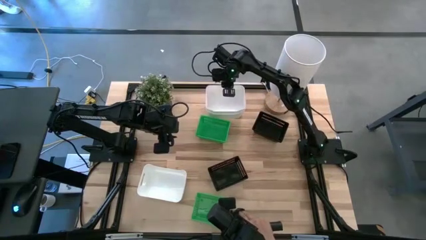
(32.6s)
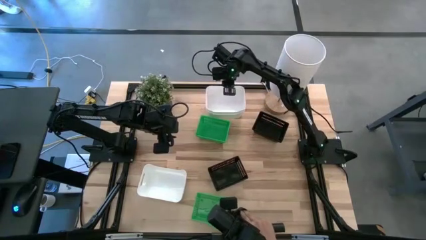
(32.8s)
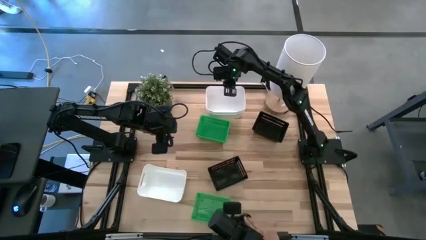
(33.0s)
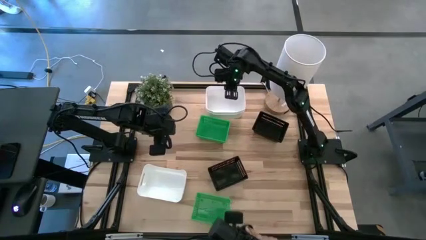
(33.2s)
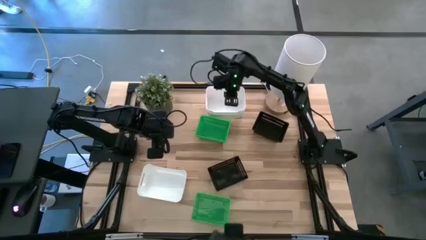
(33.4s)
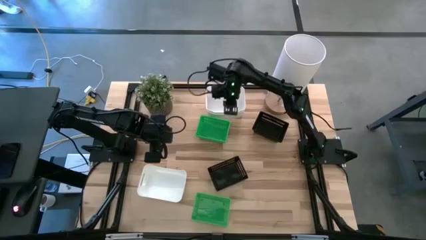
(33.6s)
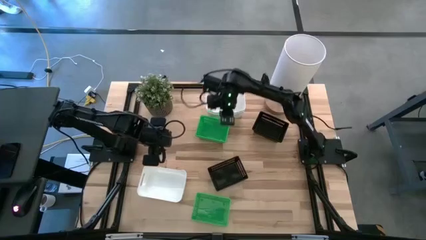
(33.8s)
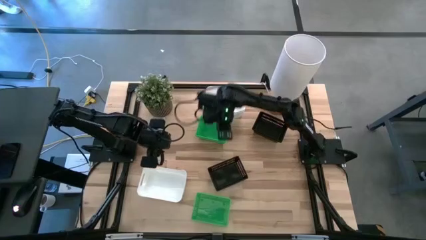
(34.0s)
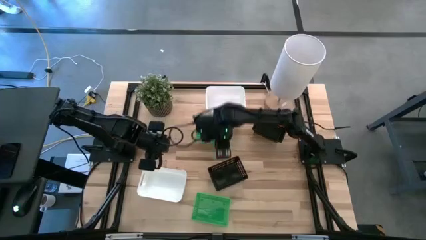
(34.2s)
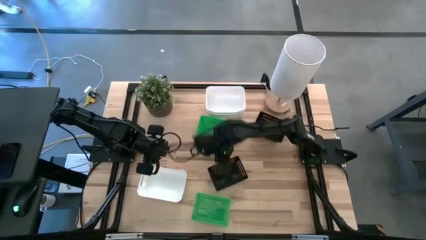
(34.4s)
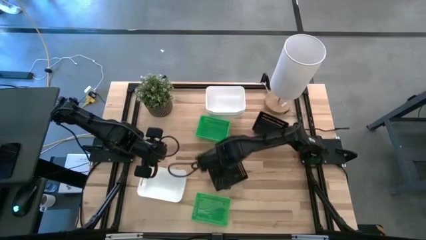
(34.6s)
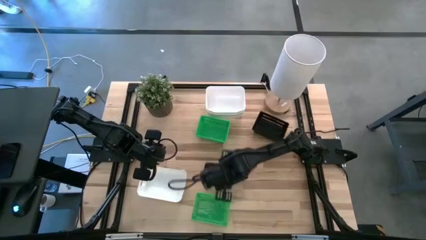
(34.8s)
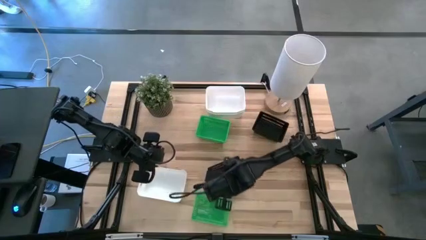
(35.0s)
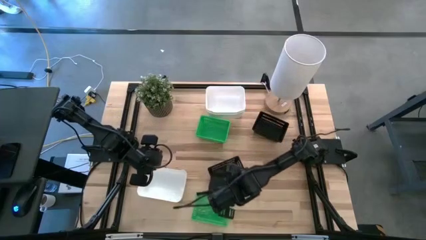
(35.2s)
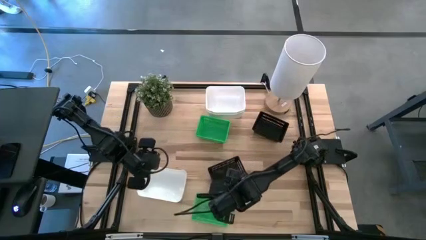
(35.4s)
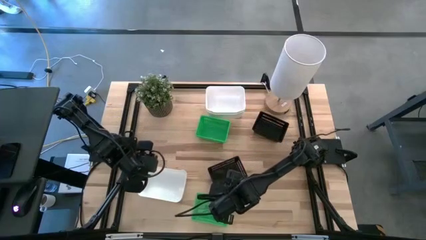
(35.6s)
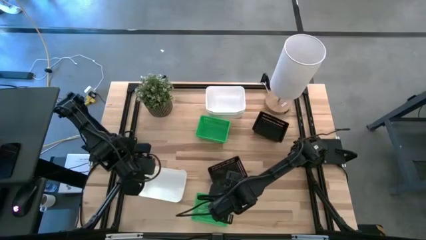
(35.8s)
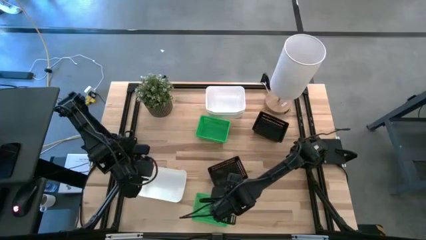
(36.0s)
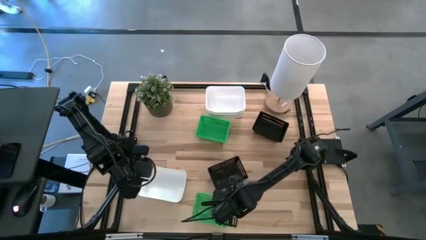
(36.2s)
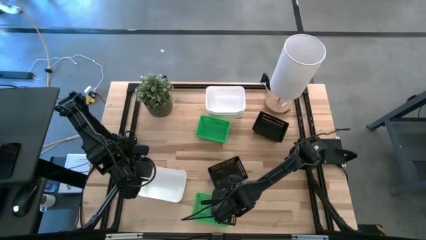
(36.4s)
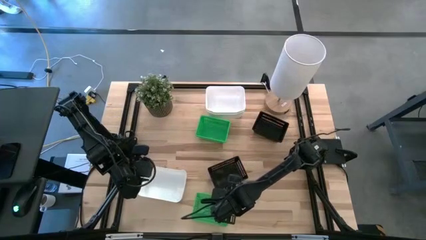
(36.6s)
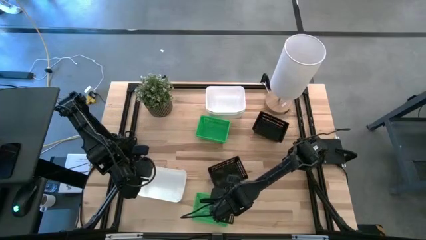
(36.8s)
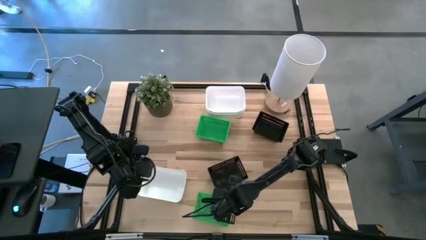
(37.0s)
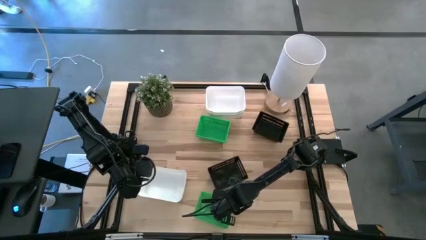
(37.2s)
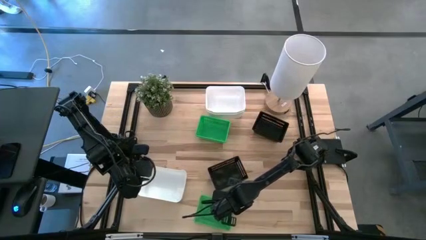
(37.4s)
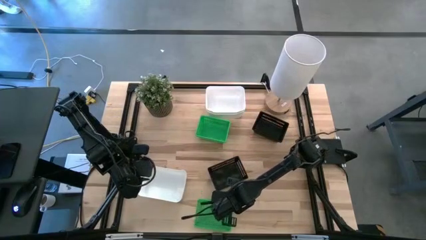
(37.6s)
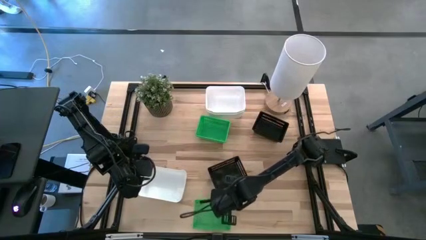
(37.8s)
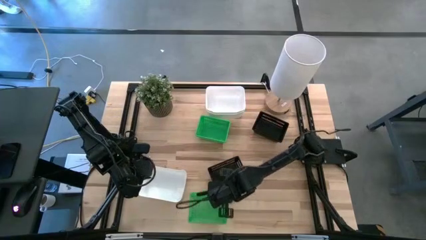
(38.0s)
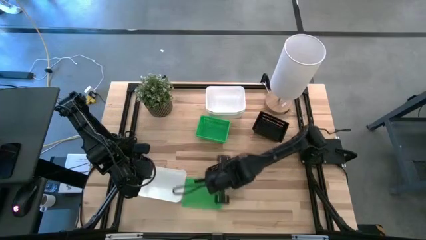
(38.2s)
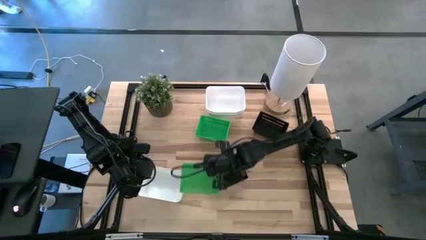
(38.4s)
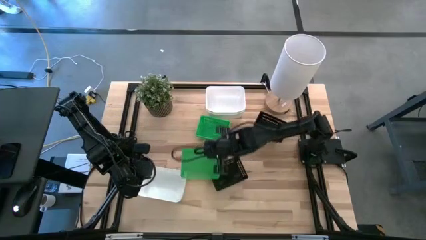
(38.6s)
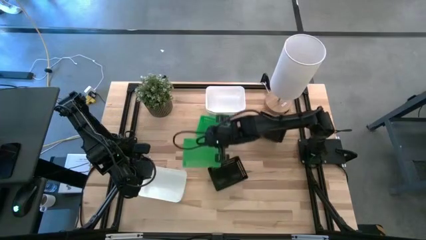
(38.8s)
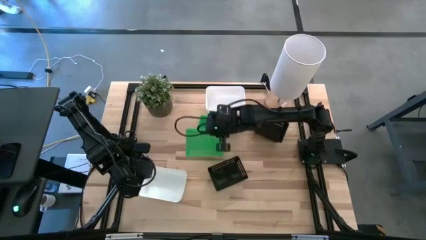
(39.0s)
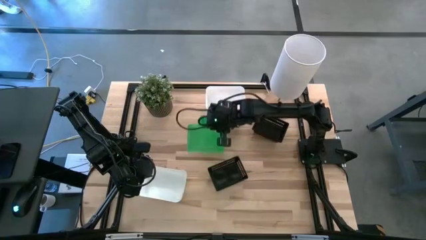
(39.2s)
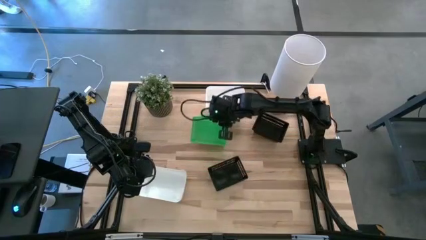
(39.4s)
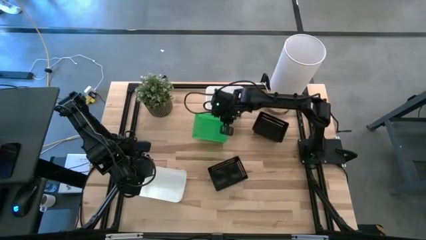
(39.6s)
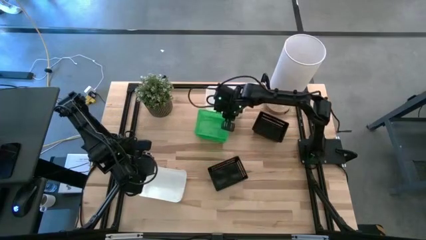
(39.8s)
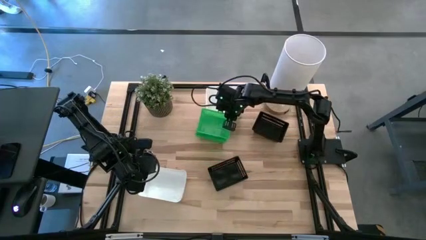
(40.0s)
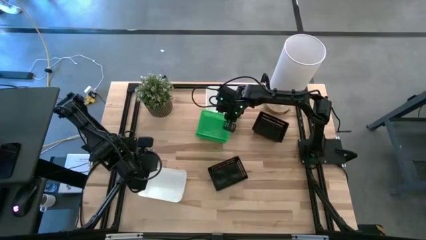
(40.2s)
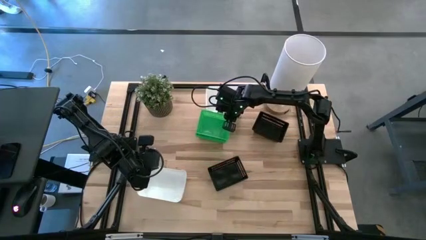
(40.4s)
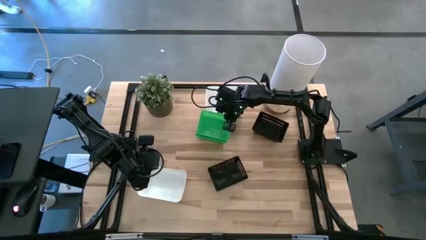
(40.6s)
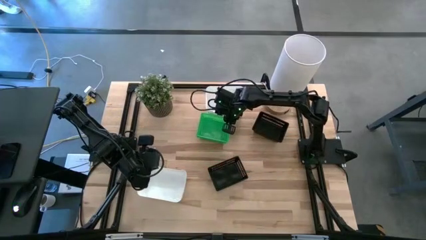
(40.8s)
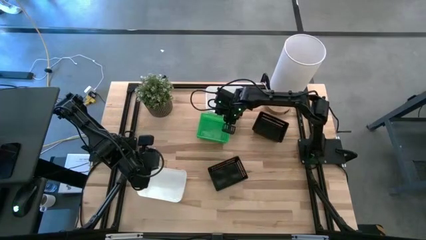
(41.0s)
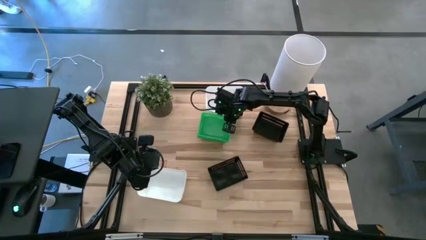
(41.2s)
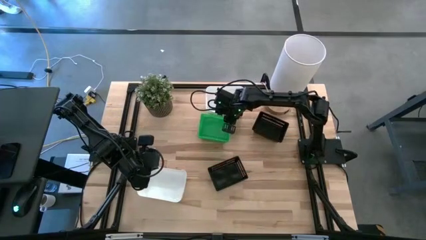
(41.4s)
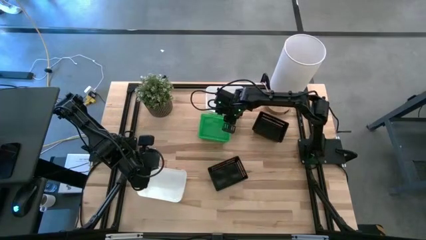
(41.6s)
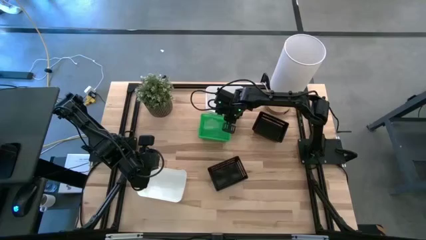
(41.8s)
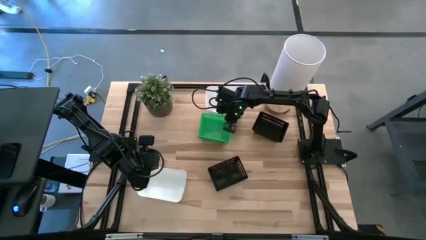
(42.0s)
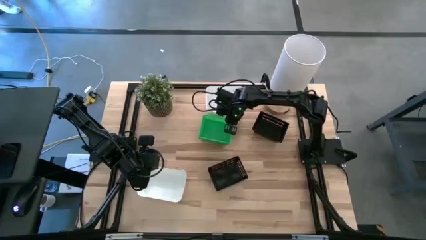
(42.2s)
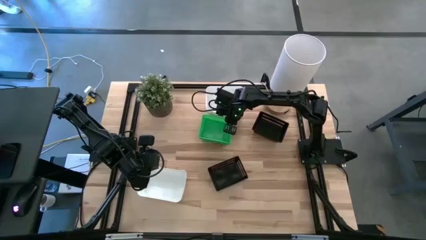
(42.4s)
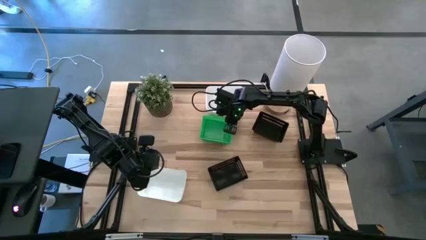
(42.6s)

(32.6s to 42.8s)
Stack the bottom green bin on top of the top green bins
